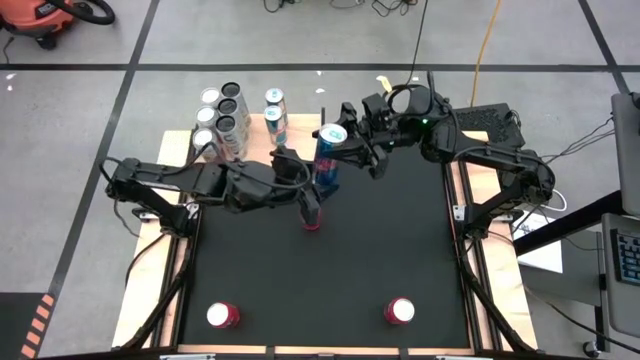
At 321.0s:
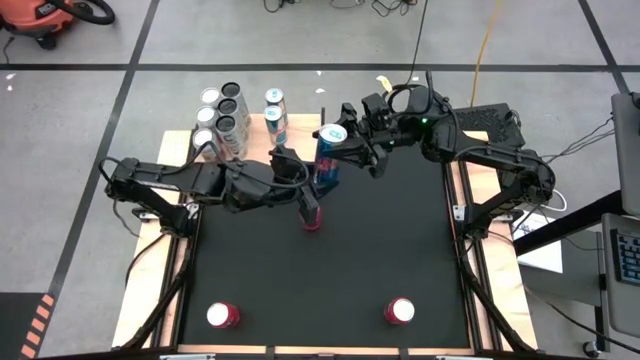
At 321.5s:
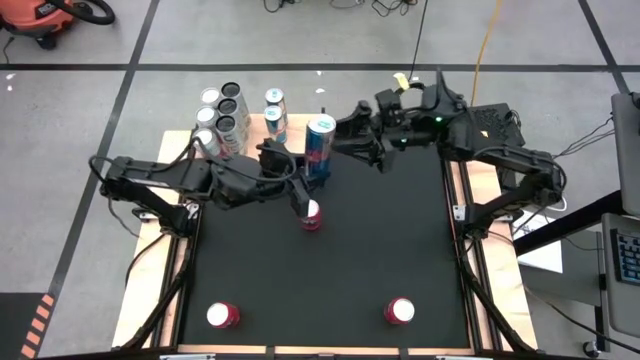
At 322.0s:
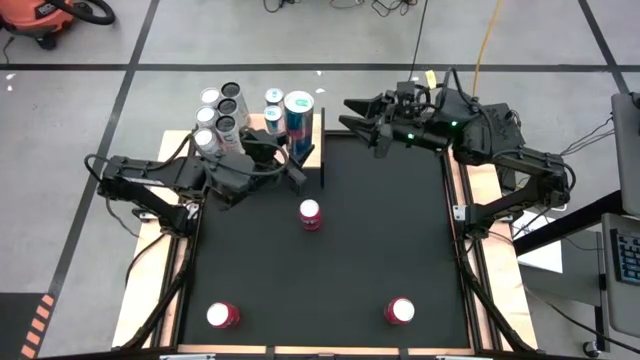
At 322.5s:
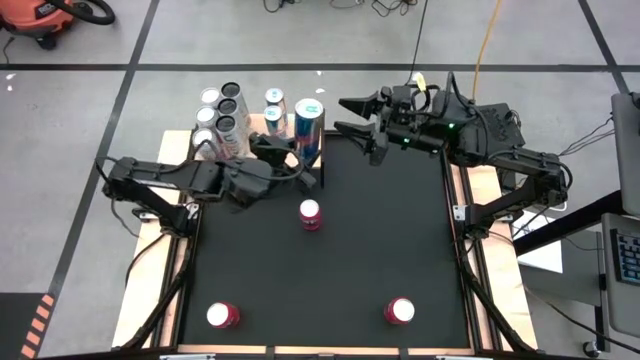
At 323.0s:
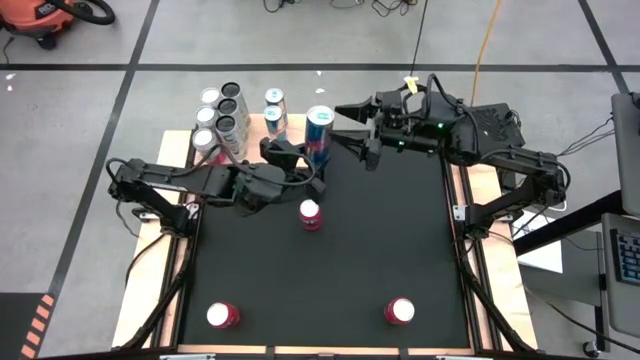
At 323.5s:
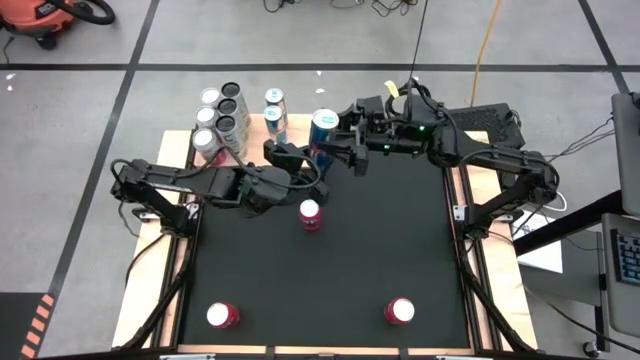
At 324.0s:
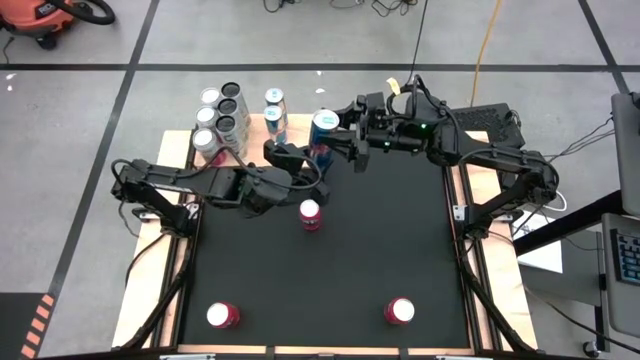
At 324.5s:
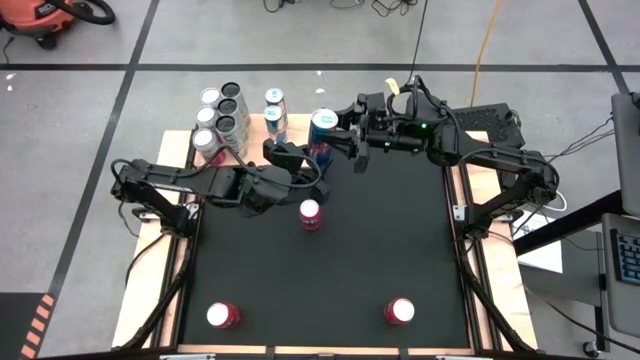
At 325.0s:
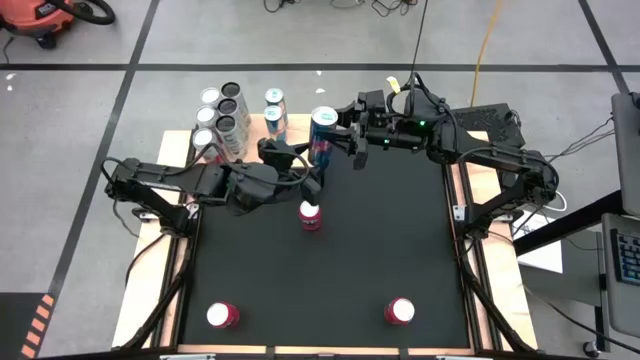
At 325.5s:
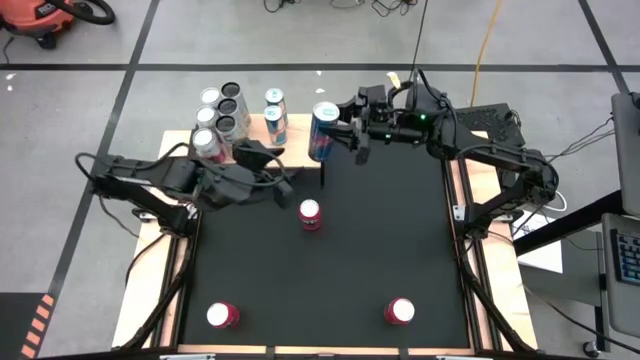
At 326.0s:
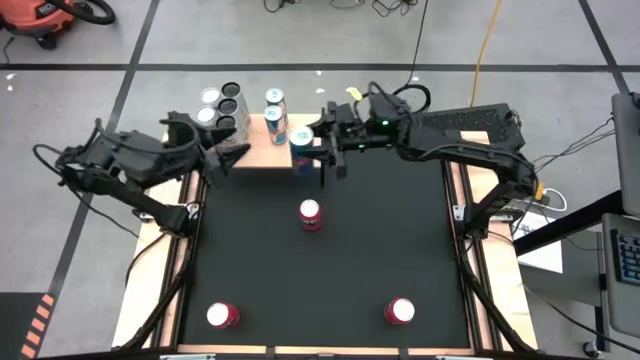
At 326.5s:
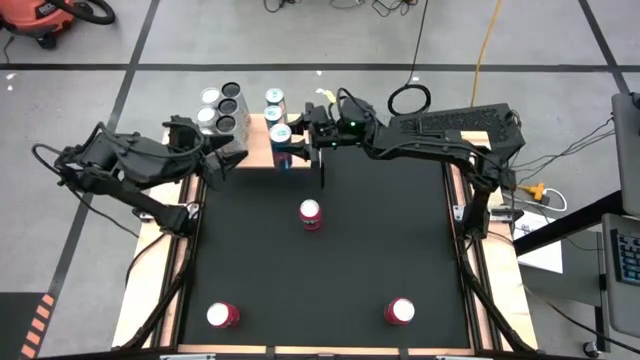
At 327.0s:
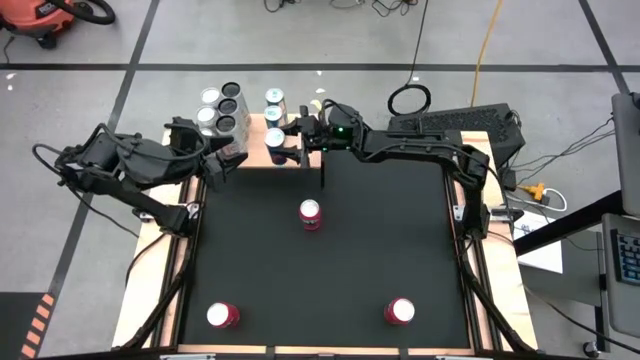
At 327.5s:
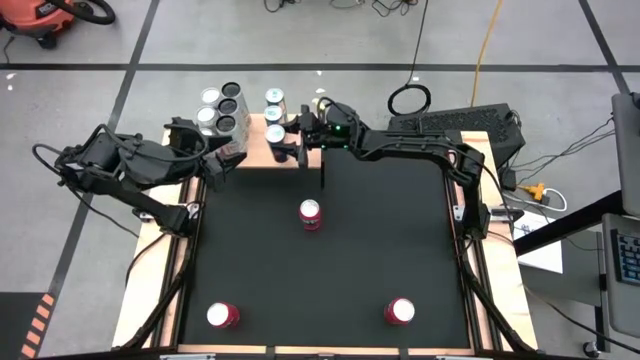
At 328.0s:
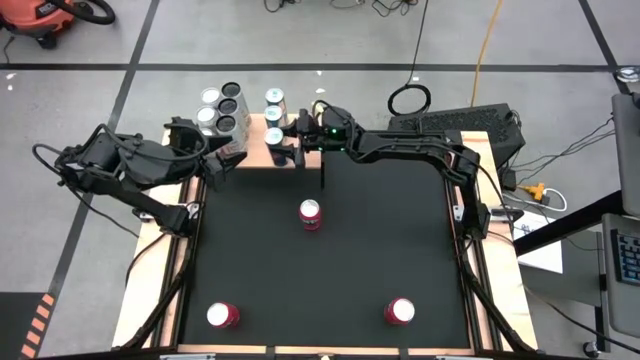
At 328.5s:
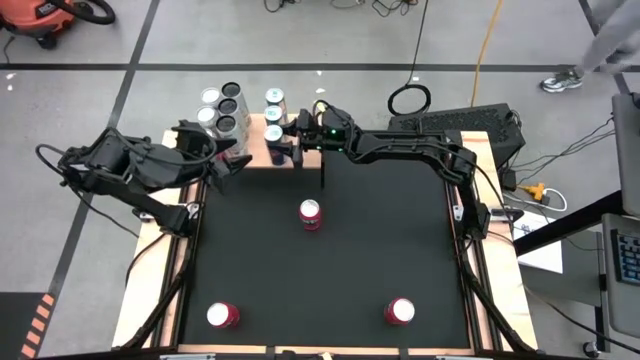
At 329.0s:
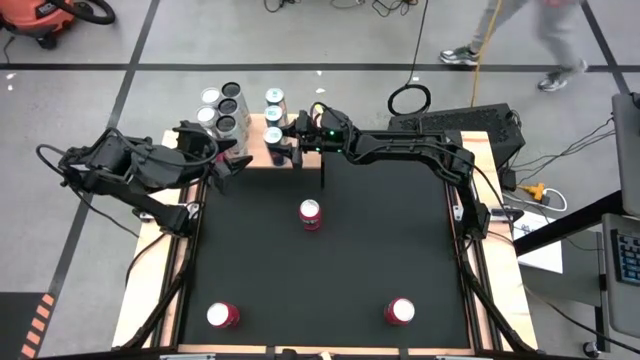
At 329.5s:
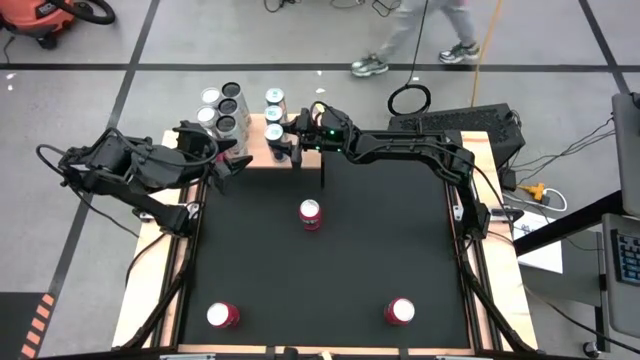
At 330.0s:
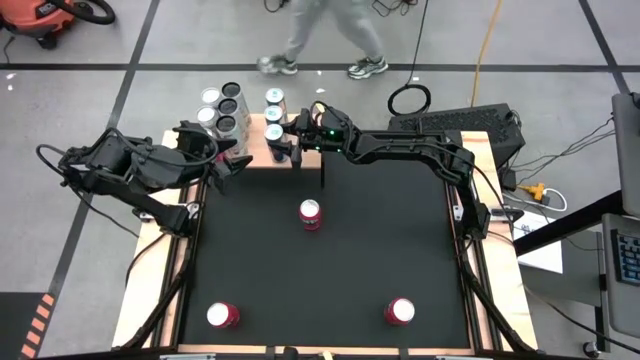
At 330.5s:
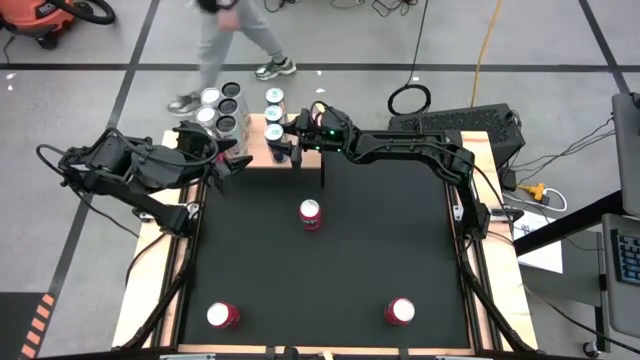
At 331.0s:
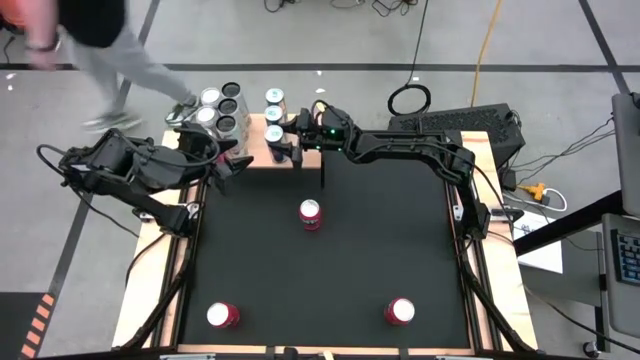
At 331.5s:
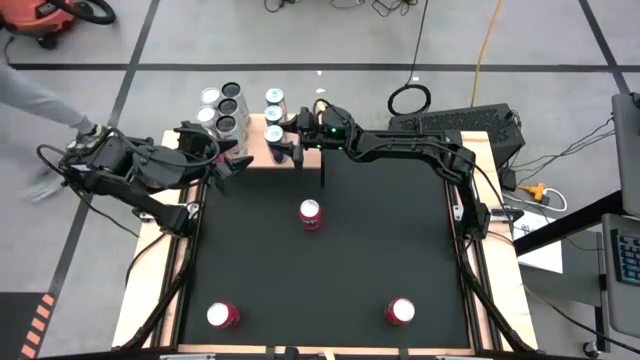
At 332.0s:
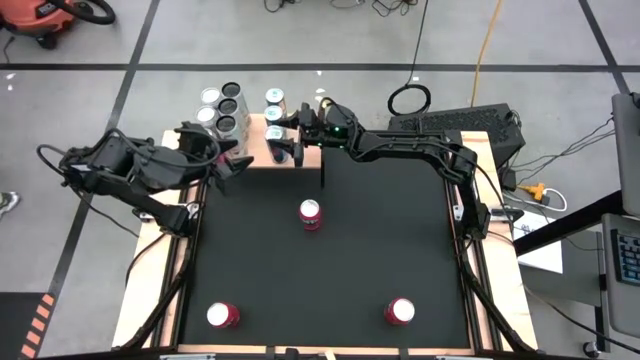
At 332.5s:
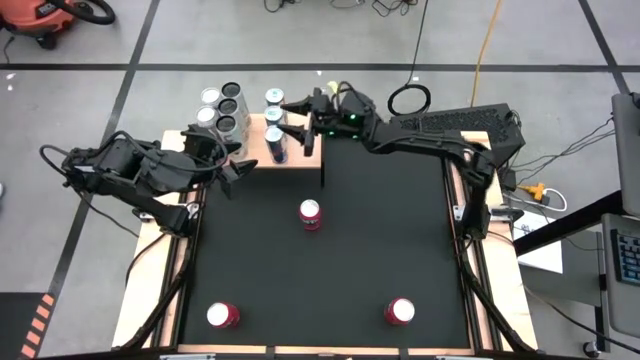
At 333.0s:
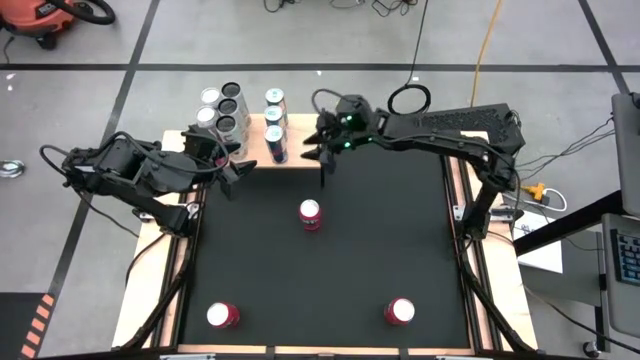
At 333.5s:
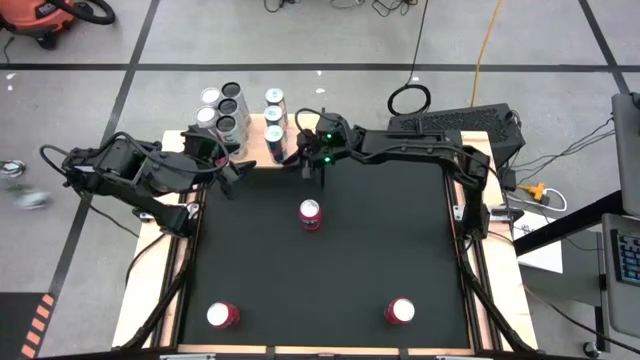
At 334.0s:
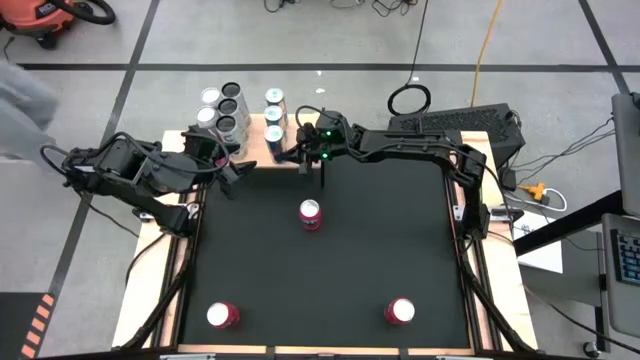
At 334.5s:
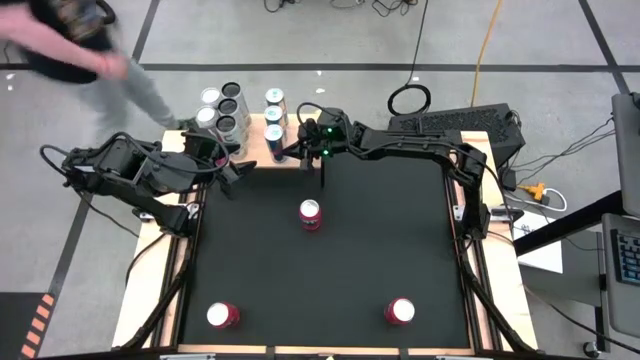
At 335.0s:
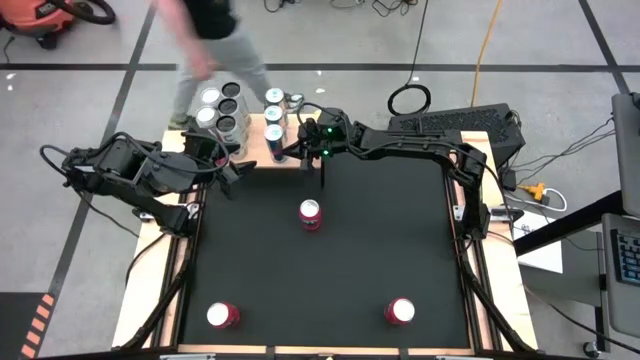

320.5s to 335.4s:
Task: Place canned beverage on shelf
Put the blue soda can on the shelf aligned with the other blue soda cans

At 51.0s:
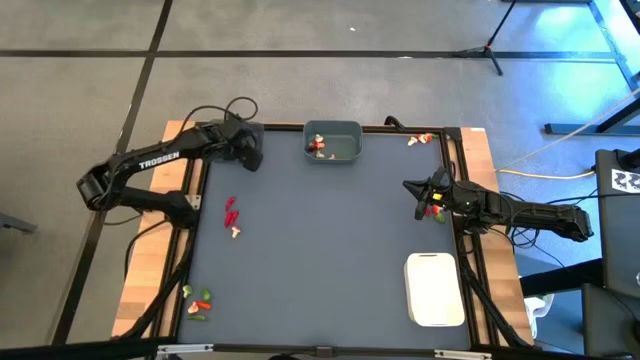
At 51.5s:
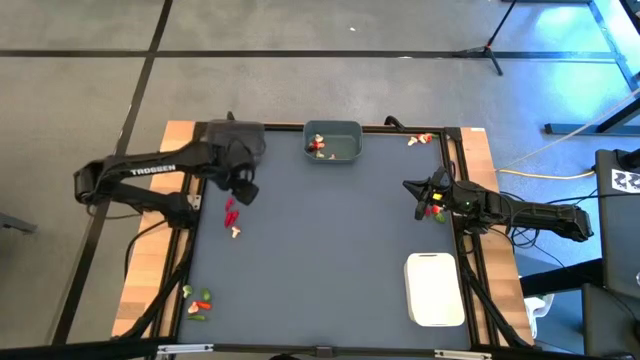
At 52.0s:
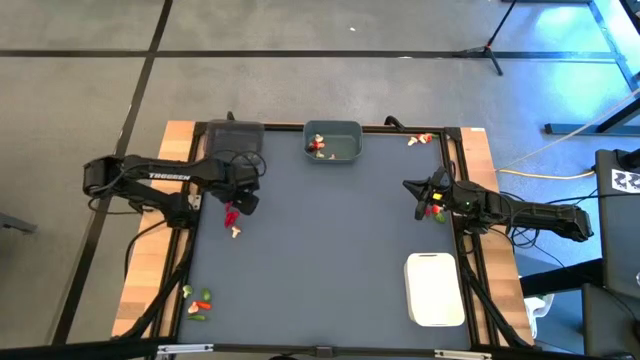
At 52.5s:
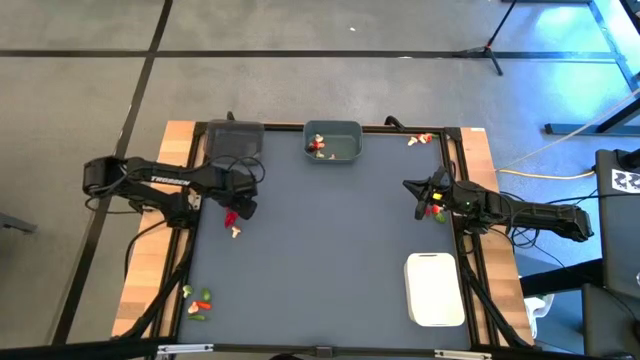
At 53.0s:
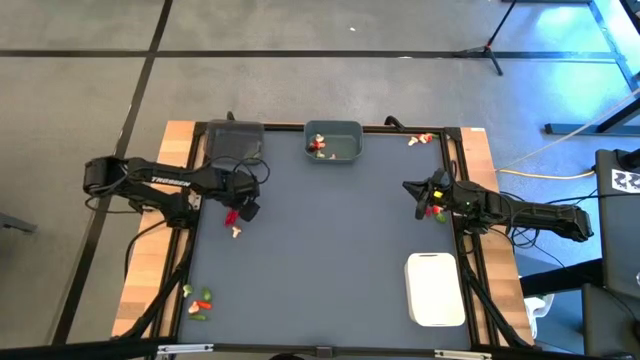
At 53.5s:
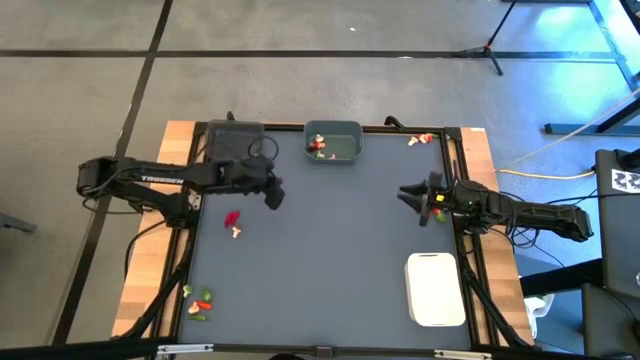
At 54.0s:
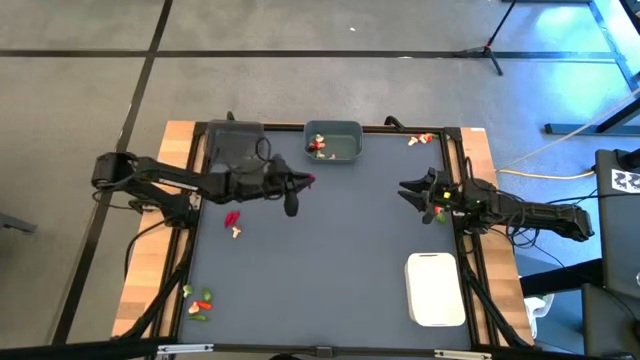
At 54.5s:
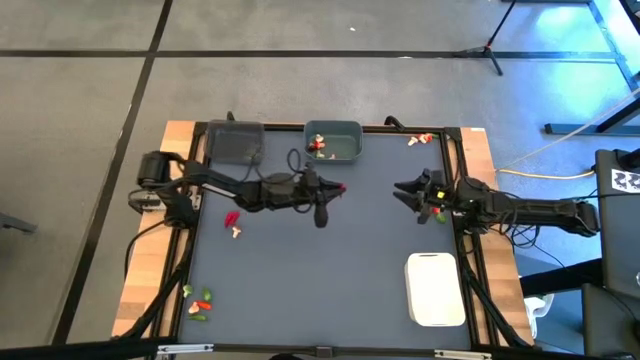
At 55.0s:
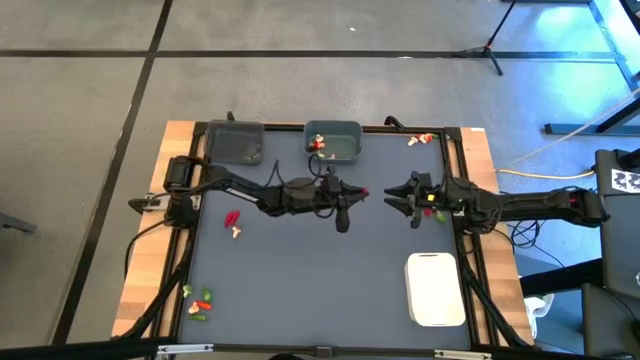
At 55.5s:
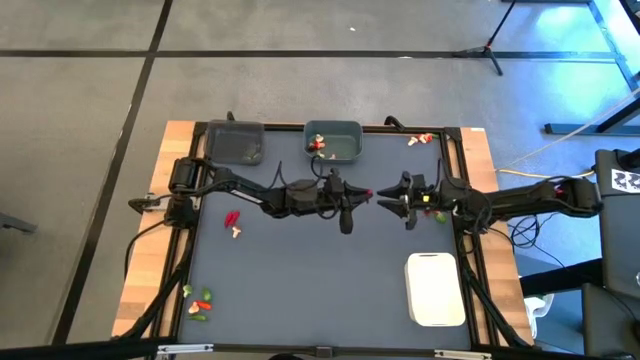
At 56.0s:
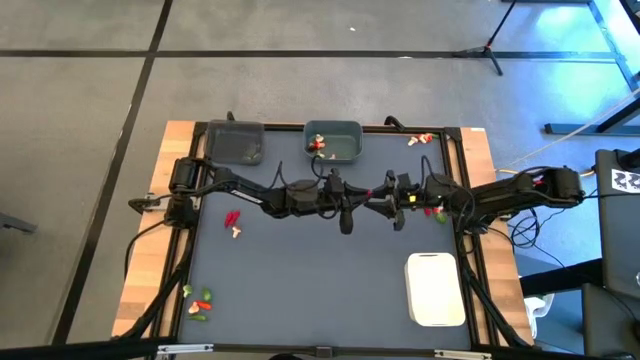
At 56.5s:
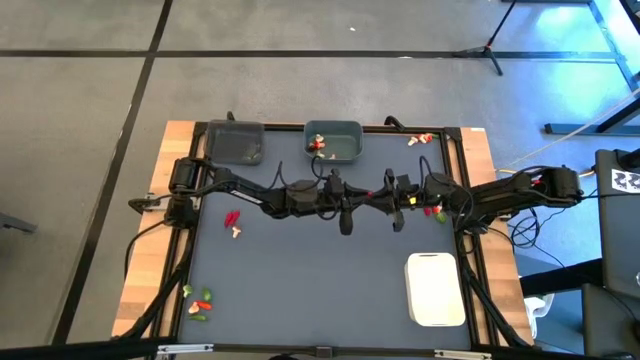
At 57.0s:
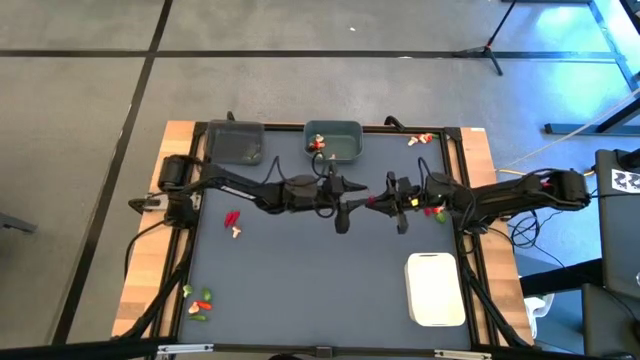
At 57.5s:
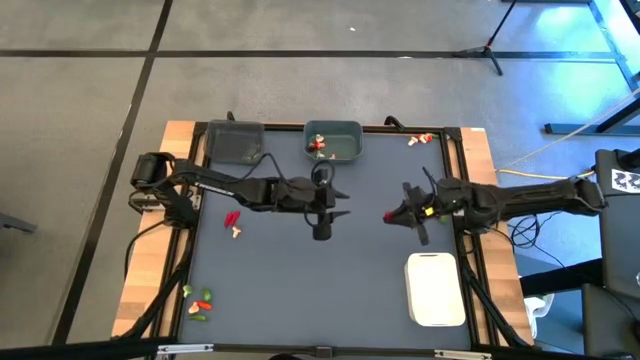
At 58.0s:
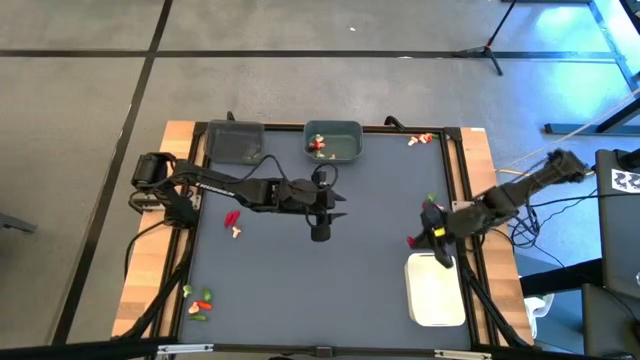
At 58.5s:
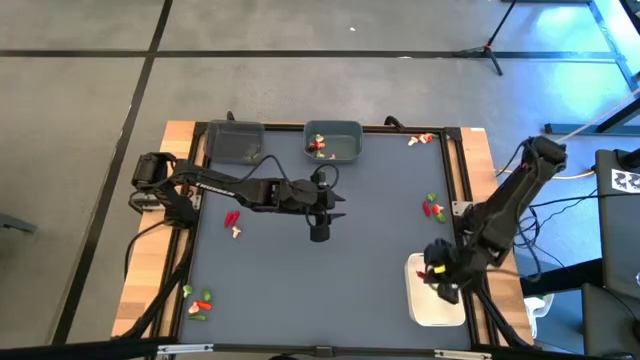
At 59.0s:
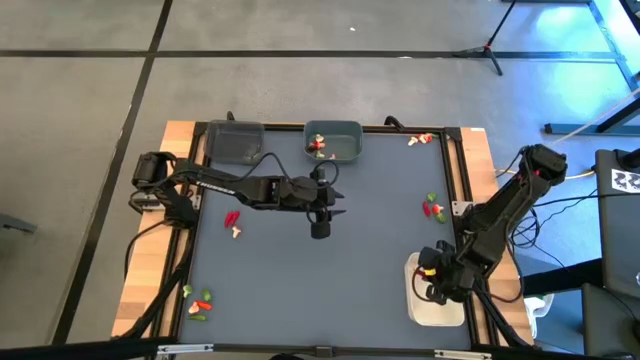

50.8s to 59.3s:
Task: Sort produce into baskets
Put the red chili pepper into the white bin
